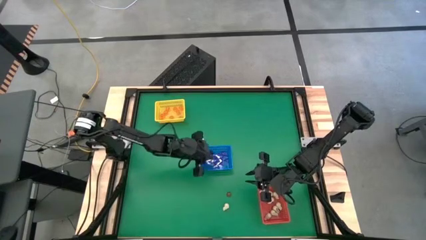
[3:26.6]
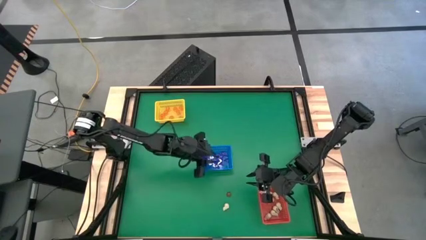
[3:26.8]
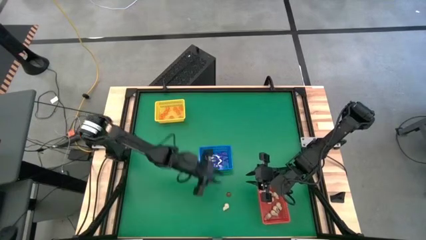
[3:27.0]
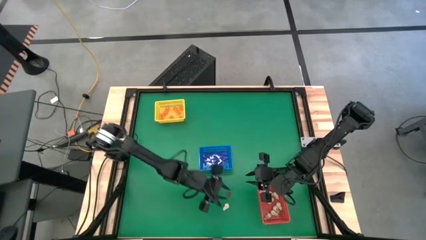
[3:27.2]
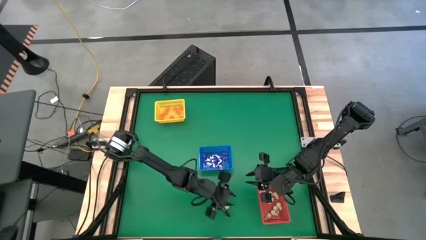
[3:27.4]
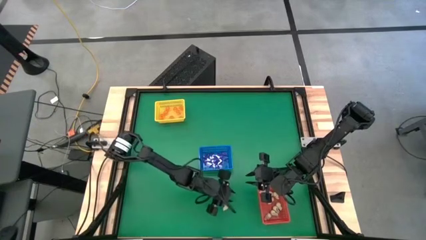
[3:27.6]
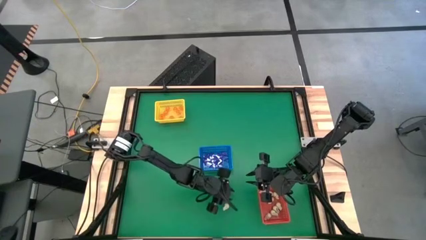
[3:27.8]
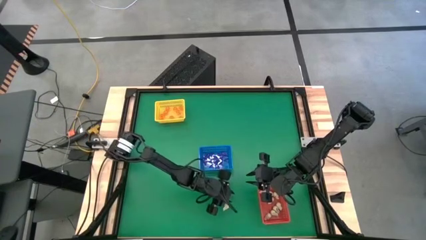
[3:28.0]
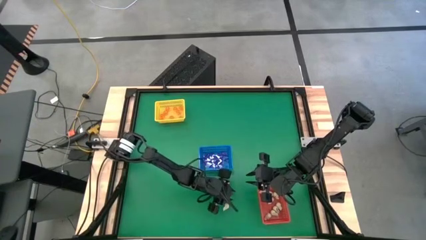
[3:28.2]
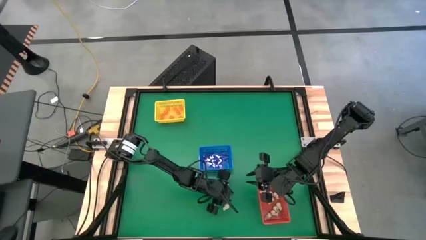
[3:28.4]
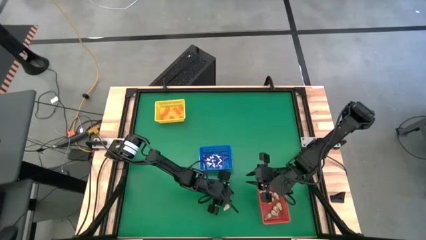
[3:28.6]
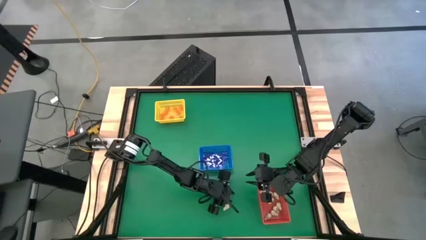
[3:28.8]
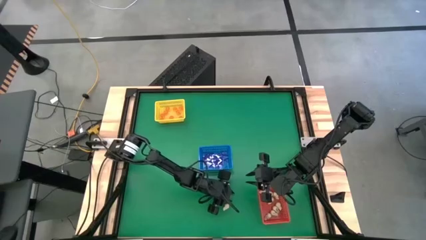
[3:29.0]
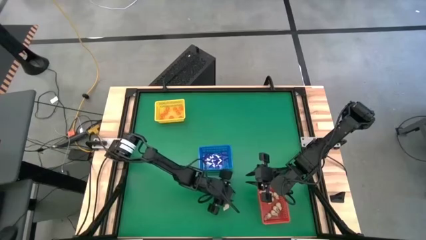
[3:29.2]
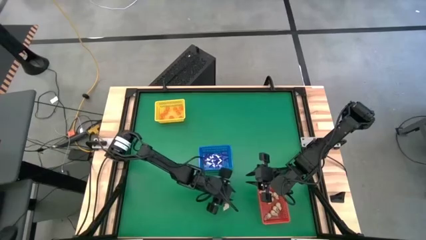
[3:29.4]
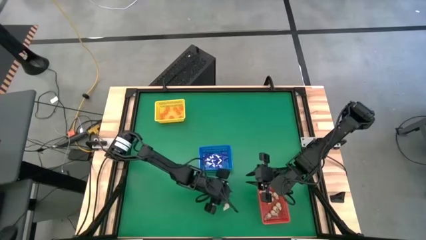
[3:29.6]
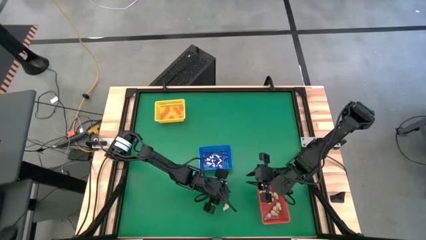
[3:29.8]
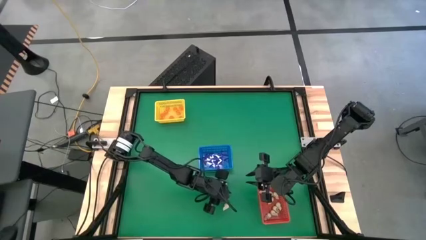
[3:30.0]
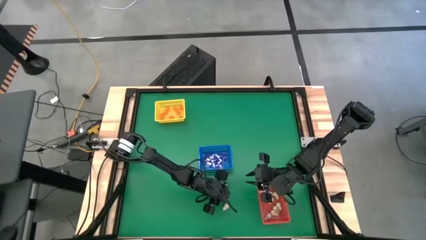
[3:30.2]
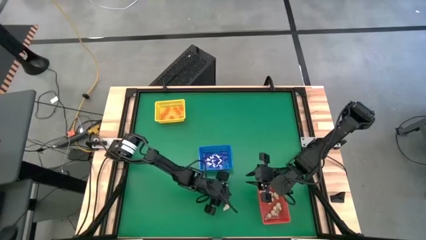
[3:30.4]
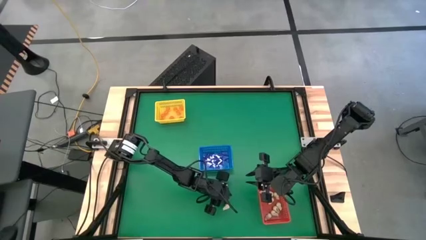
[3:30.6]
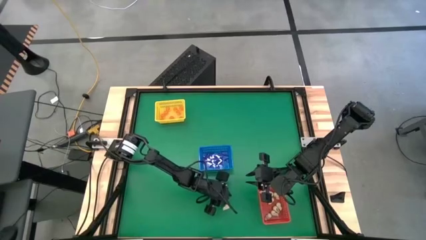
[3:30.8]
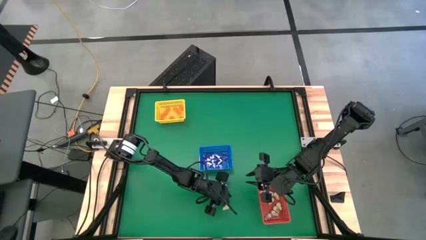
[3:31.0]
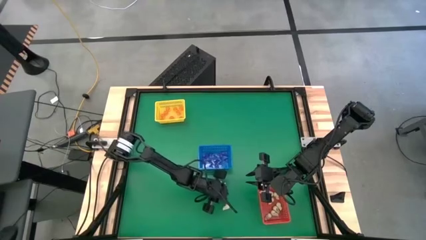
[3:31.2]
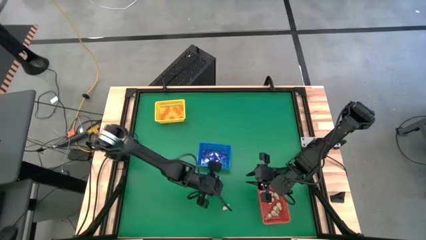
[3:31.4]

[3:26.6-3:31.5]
Task: Sort Halloween decoration
Put the pumpkin toy into the yellow bin

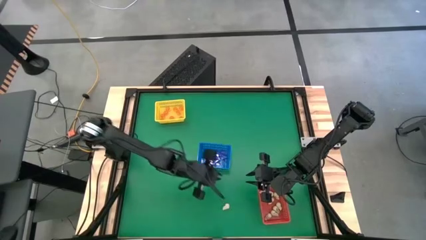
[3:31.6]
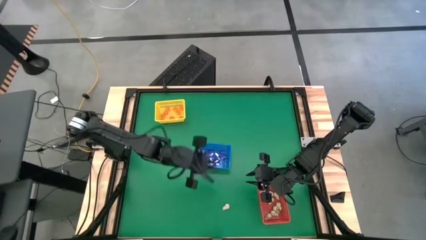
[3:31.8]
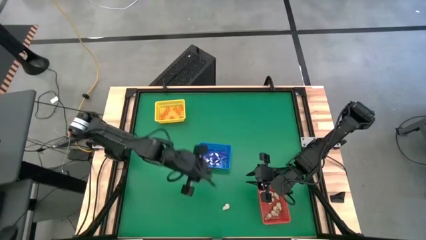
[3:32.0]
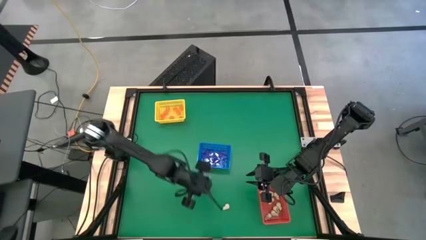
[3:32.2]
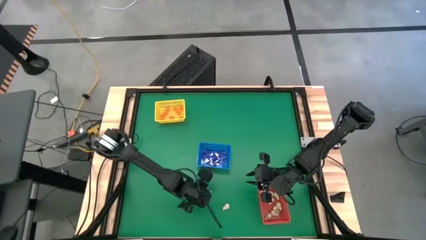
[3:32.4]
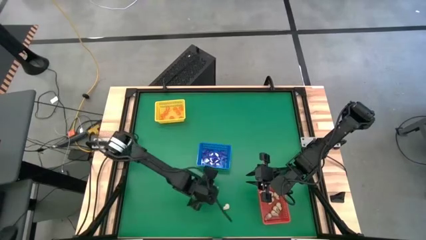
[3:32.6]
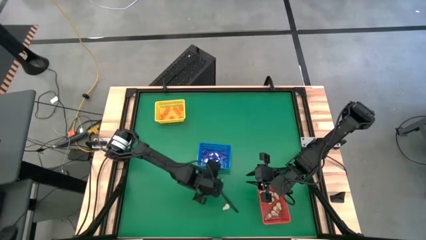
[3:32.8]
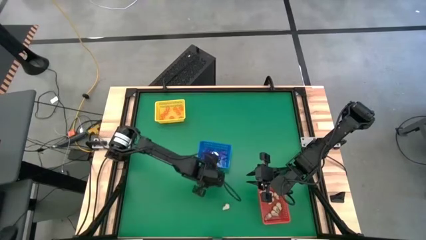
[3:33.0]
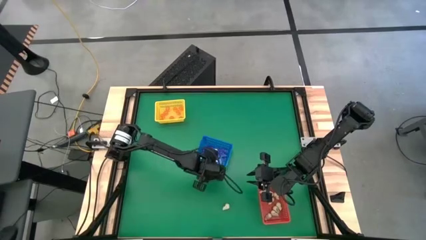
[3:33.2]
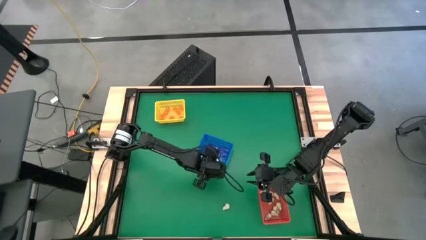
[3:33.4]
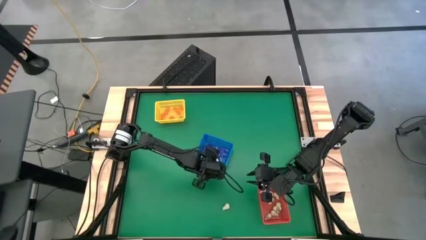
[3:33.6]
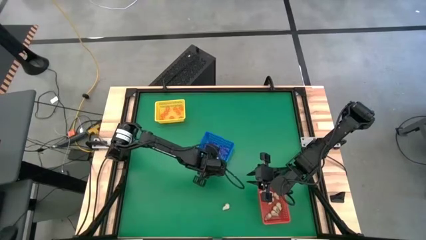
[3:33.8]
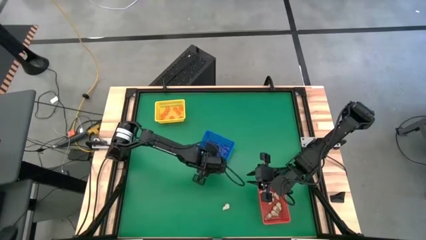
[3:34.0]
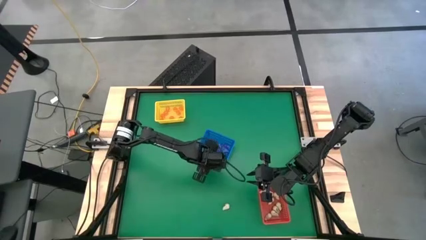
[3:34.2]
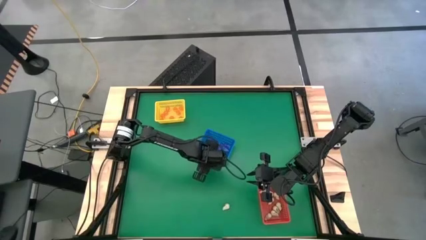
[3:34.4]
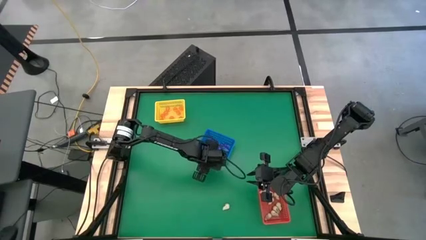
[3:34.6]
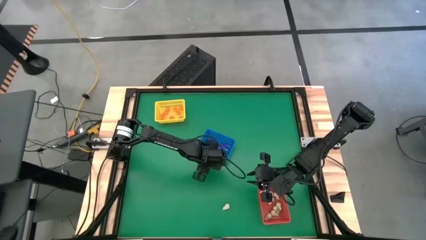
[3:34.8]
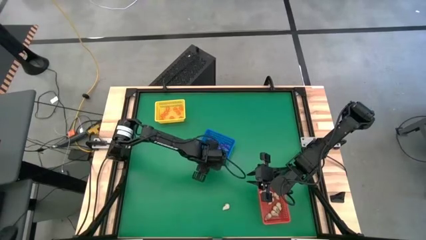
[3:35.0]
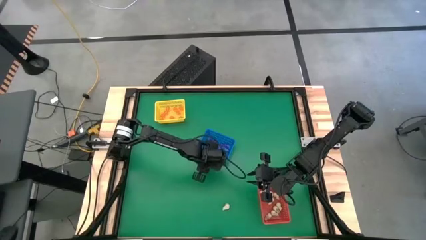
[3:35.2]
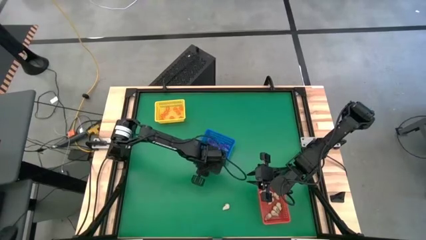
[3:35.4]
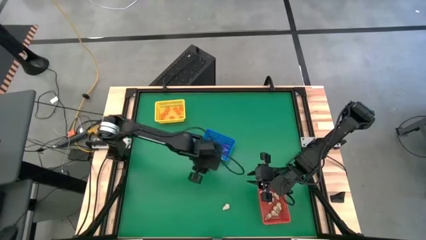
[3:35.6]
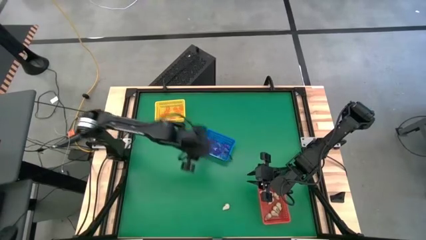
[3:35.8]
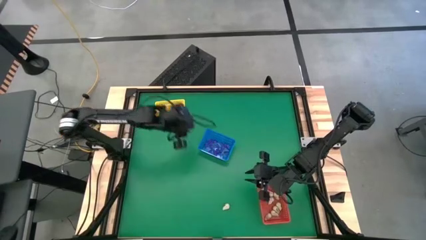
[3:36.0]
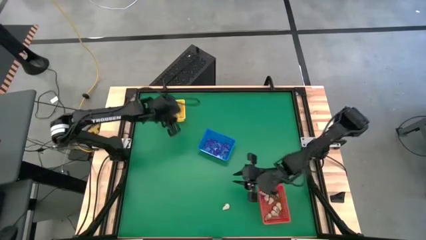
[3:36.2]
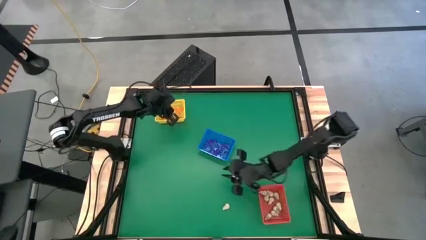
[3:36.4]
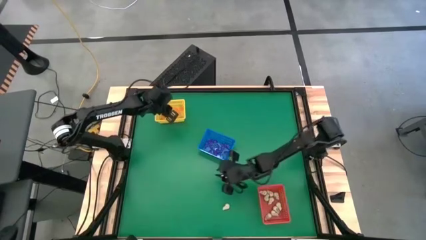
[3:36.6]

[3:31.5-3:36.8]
Put the pumpkin toy into the yellow bin

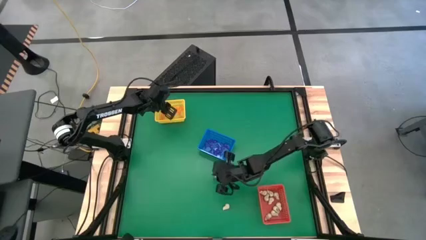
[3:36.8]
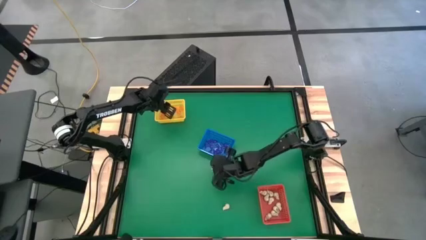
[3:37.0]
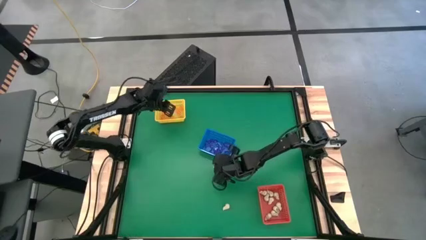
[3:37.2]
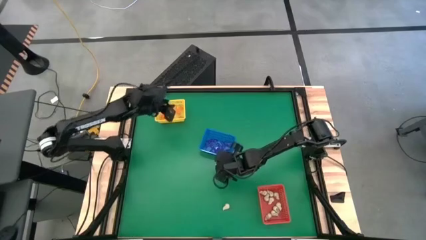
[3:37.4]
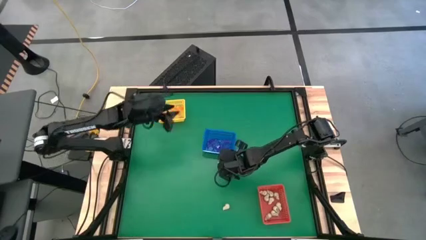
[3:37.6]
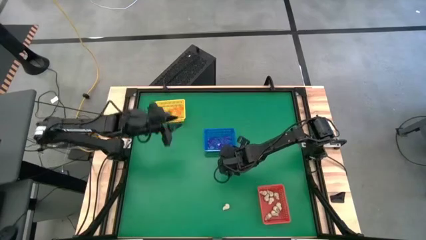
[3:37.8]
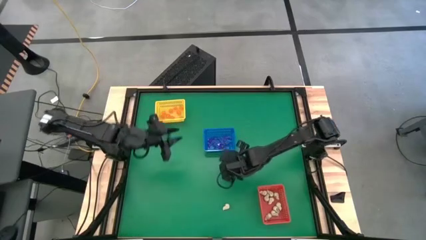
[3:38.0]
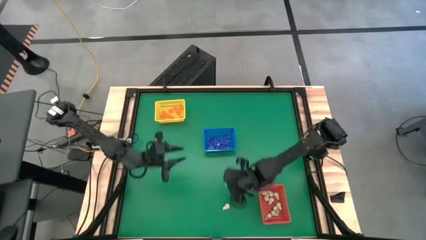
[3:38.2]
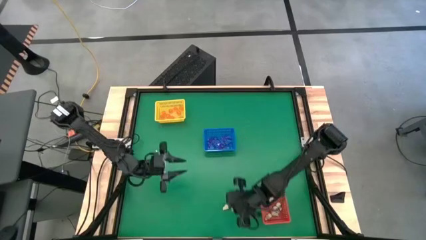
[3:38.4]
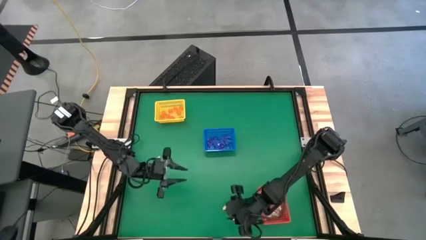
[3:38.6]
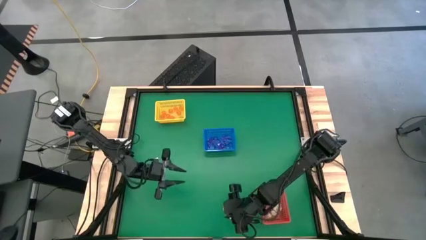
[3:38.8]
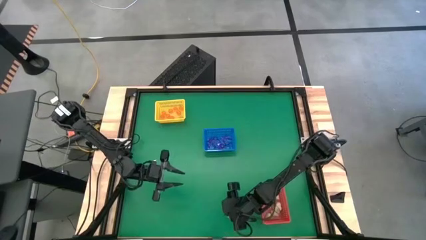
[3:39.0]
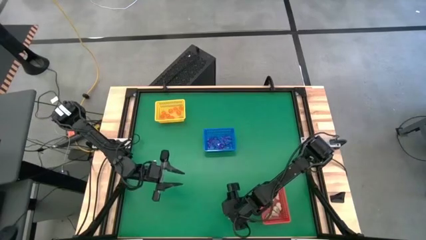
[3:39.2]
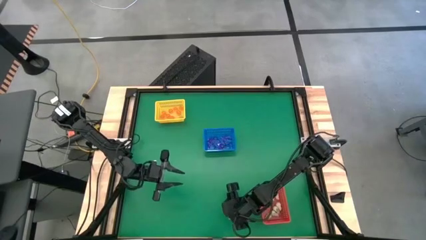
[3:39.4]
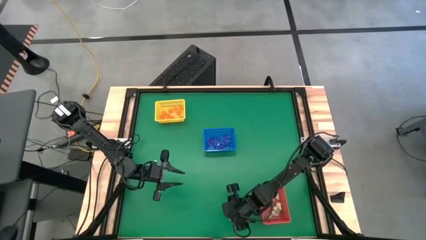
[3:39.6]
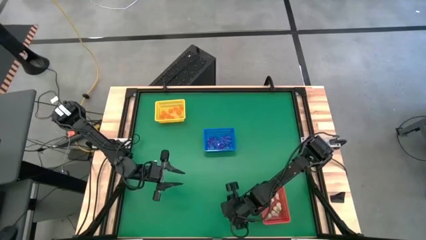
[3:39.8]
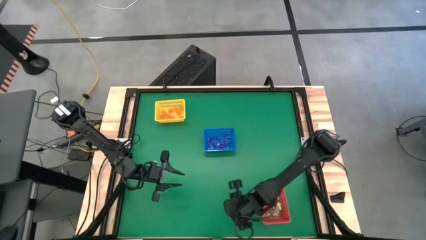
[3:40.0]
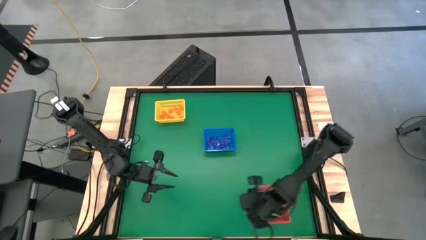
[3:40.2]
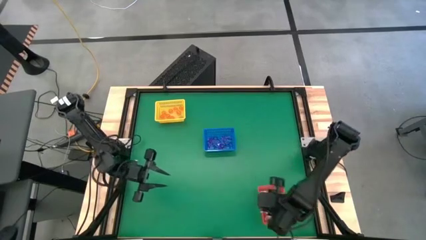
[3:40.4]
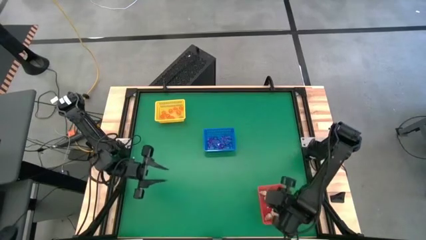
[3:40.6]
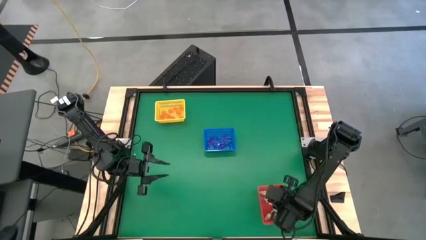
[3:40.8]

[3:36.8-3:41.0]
Put the skull toy into the red bin

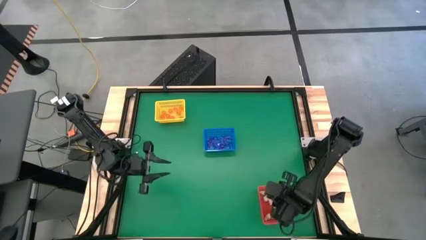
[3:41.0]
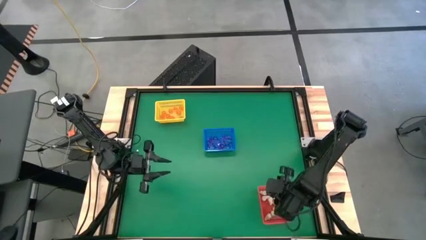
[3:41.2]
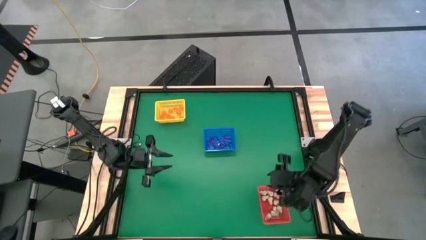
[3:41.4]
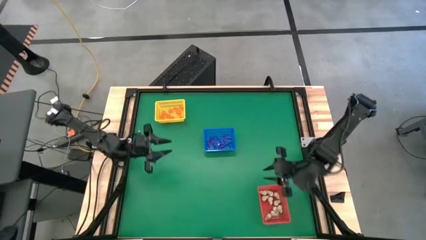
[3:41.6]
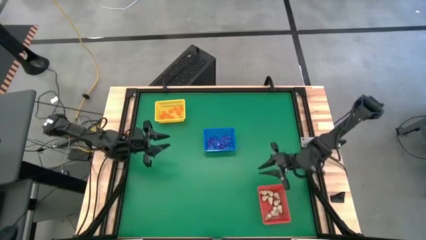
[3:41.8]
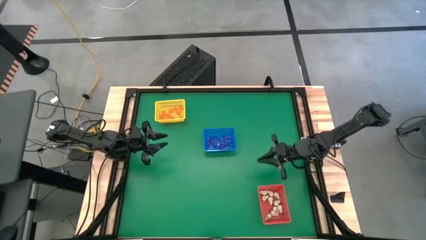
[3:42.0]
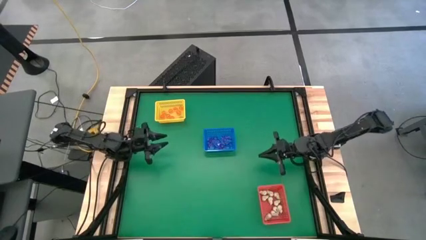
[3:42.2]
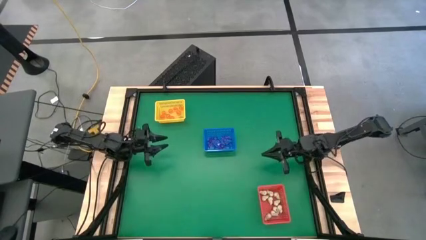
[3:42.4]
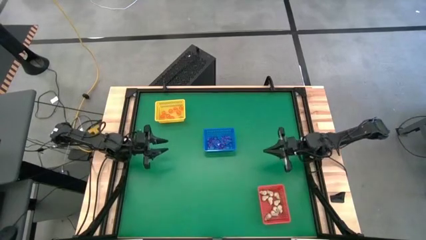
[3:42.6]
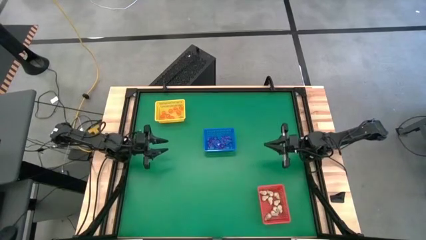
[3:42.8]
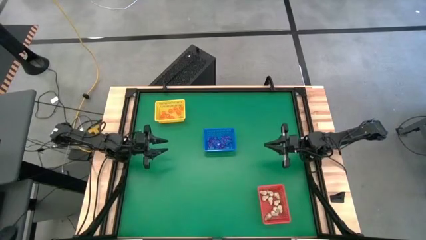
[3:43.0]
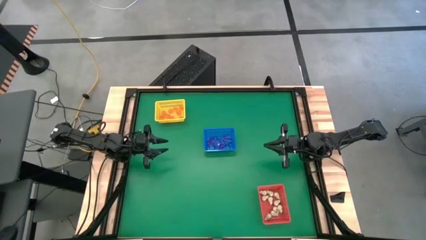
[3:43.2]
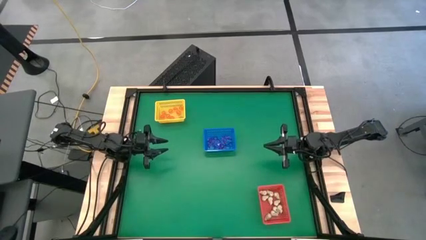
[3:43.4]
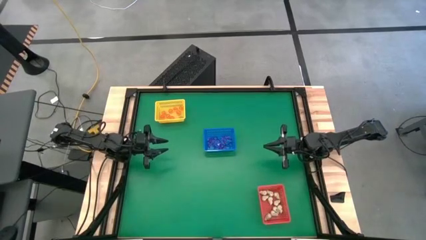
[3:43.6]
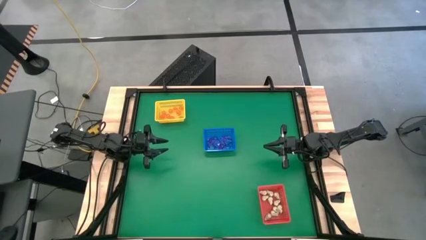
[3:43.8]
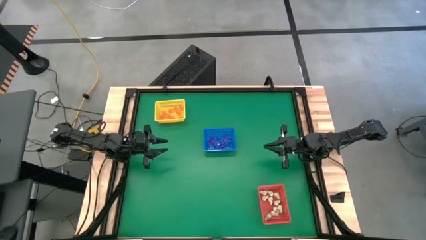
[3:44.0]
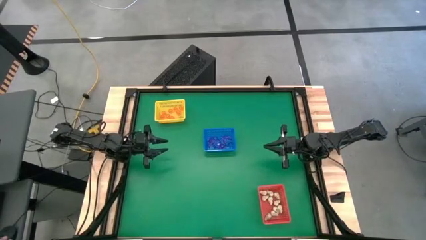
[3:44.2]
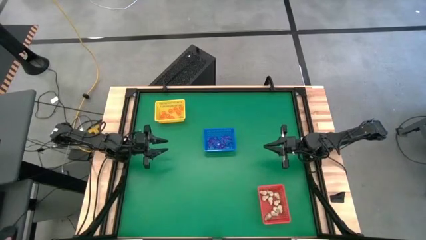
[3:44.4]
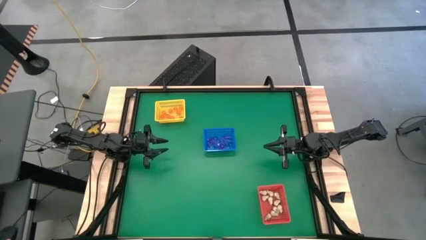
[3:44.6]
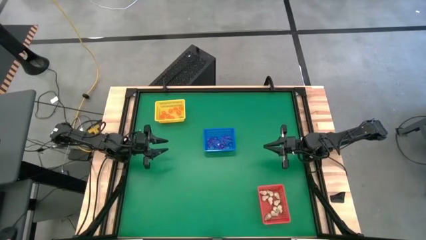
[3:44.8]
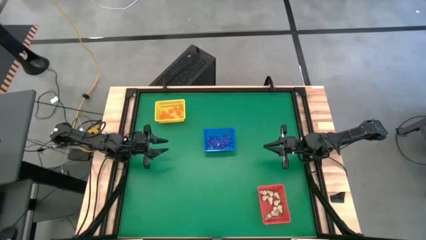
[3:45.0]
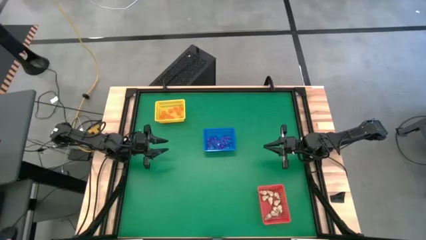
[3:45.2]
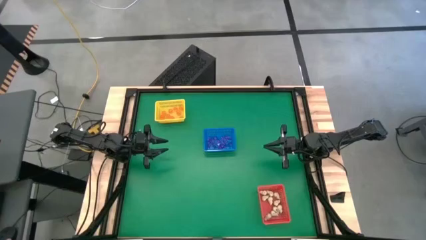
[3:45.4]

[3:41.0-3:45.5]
Return to Home Position
